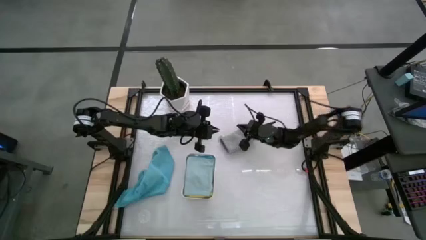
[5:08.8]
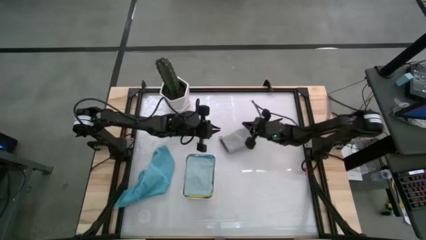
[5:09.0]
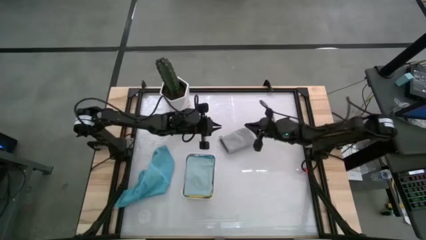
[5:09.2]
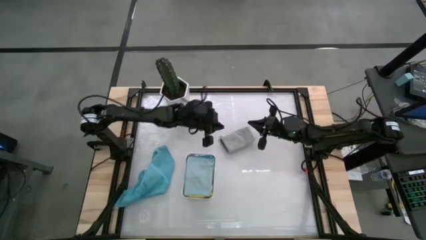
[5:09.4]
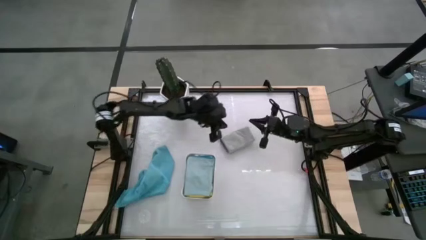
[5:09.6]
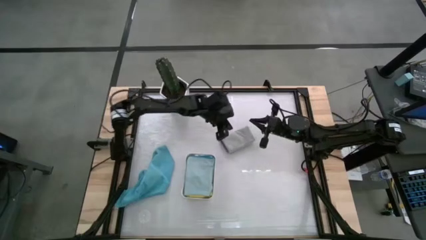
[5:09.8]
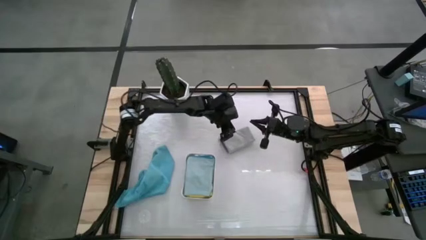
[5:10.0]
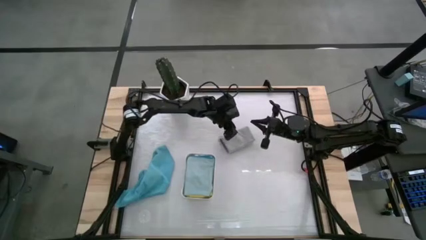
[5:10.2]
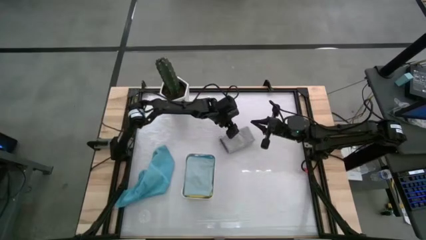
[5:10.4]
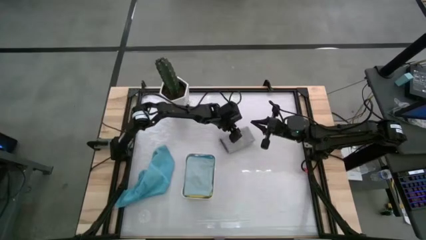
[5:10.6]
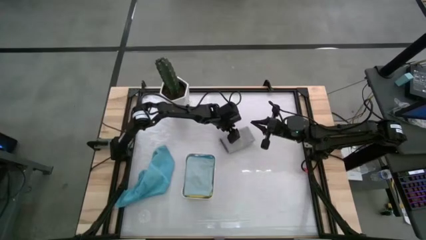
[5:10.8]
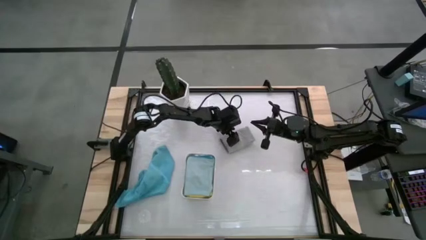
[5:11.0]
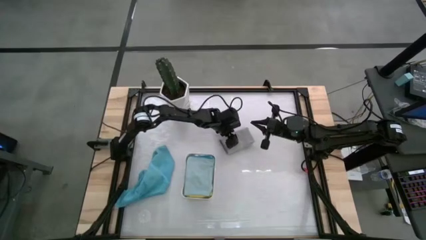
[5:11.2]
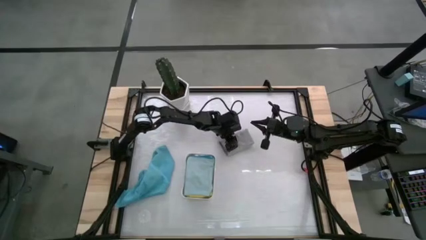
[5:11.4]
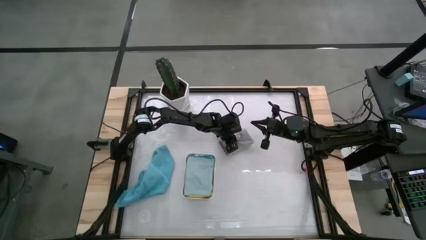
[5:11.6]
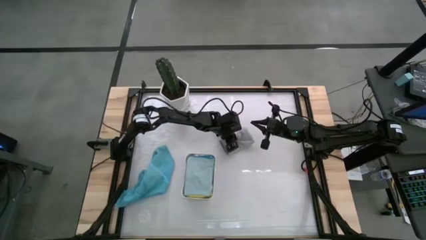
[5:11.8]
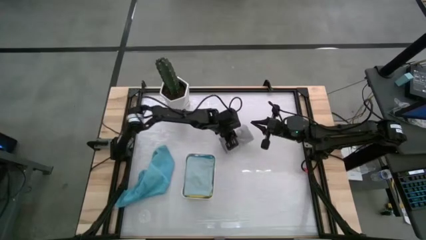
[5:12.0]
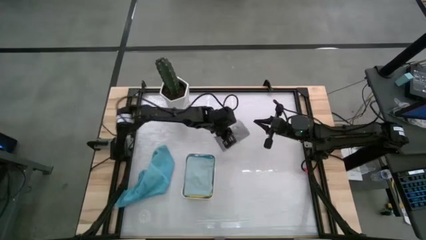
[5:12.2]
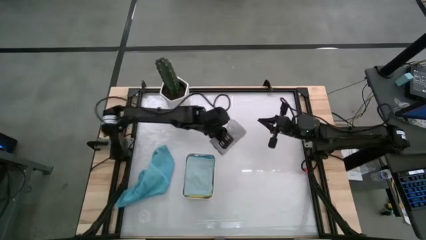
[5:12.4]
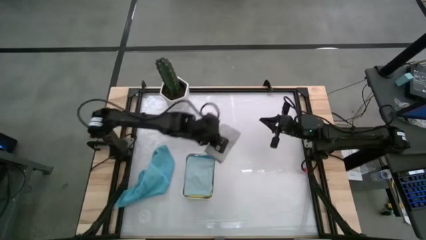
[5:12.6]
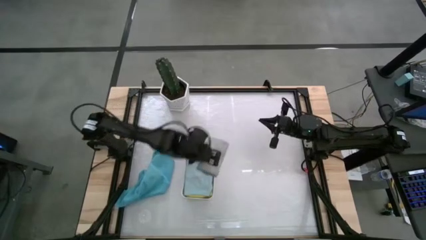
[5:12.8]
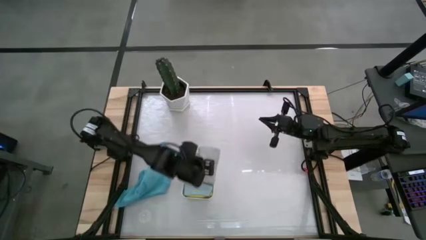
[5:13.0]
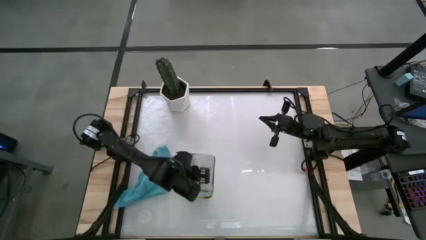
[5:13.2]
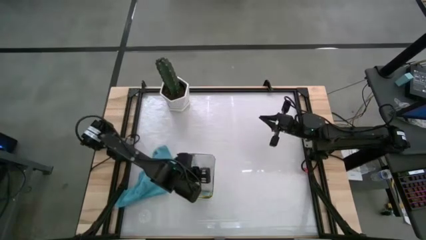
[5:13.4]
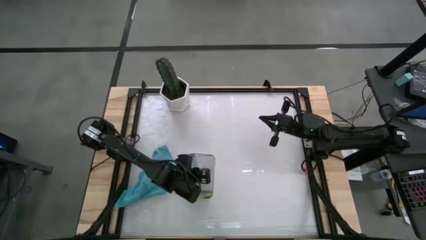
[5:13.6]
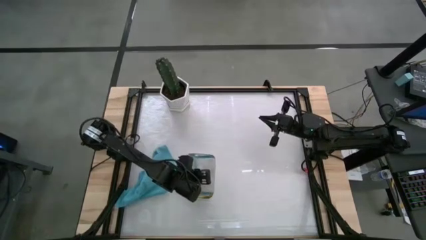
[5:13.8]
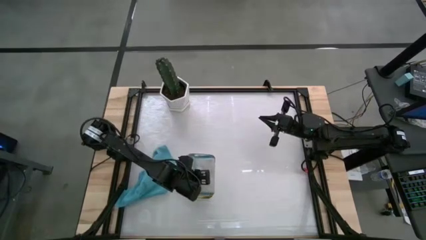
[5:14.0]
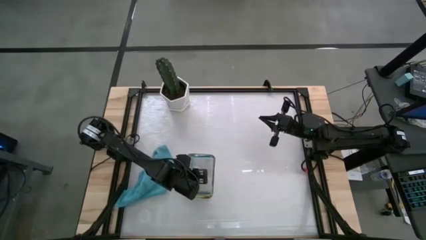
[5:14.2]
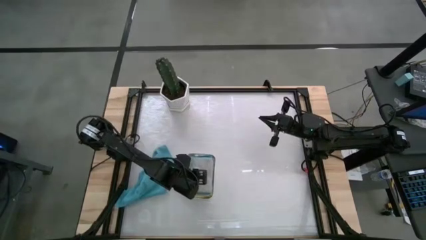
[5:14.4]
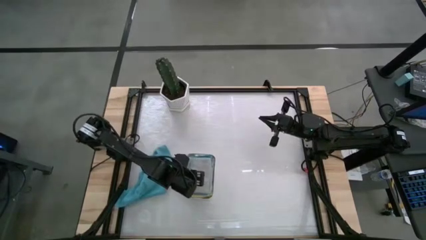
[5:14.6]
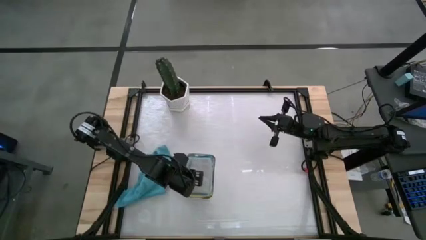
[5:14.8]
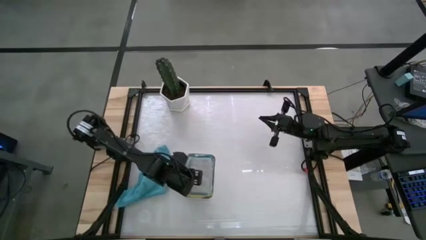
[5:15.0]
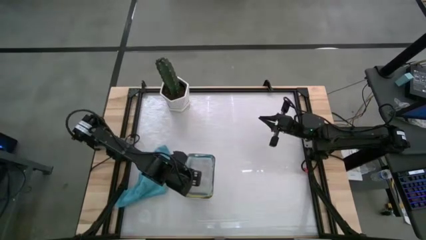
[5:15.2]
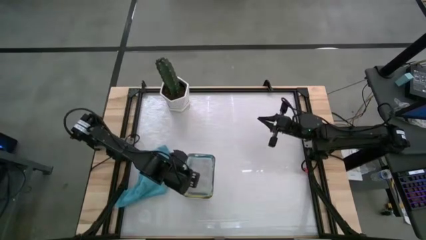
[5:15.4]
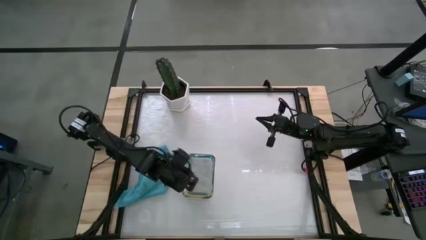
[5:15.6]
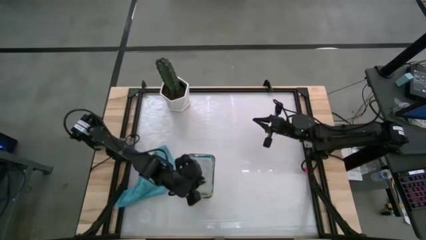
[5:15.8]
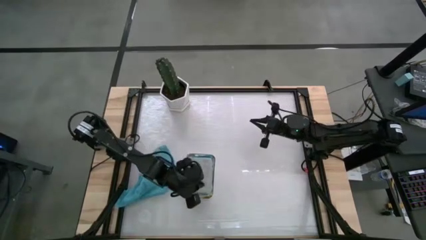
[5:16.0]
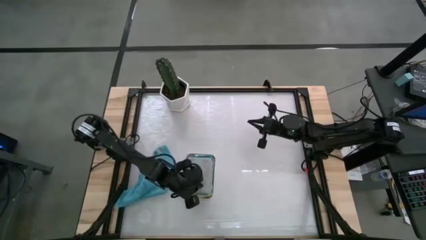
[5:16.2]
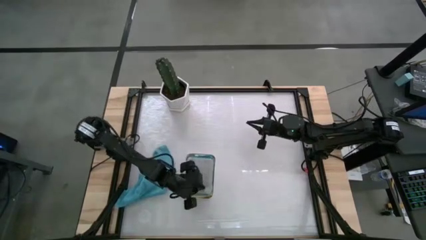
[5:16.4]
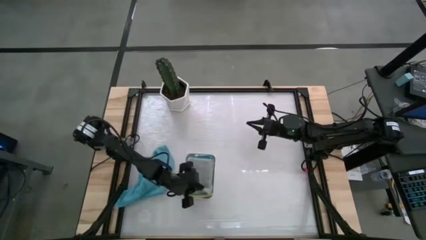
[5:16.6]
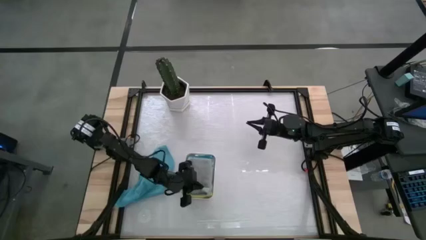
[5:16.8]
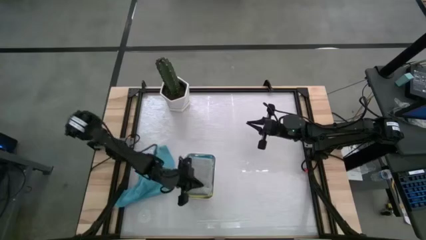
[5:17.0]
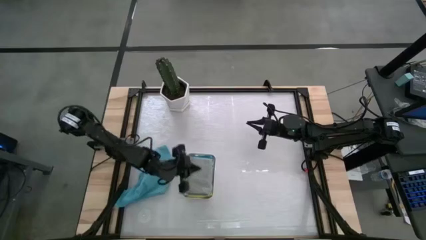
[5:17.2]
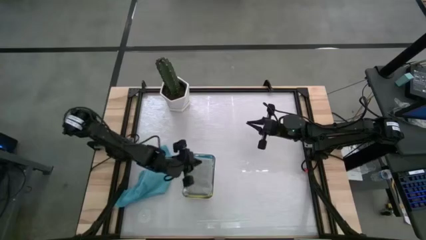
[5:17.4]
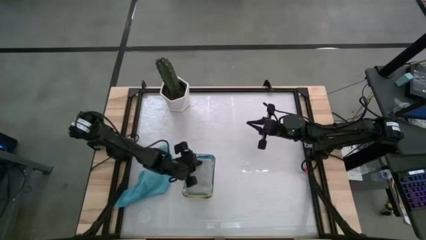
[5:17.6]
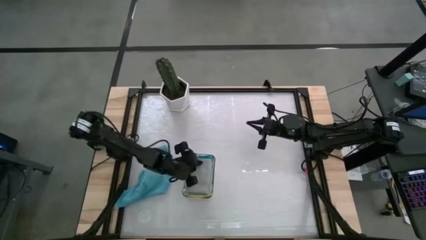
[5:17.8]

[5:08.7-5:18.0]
Task: Fold microfiber towels
Put the gray microfiber towel into the bin

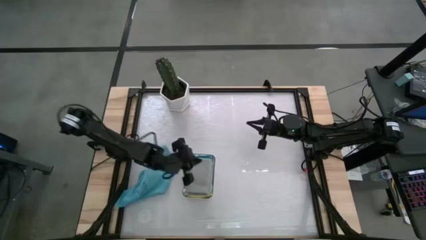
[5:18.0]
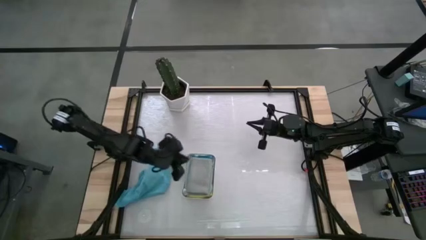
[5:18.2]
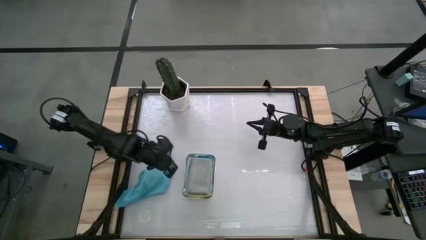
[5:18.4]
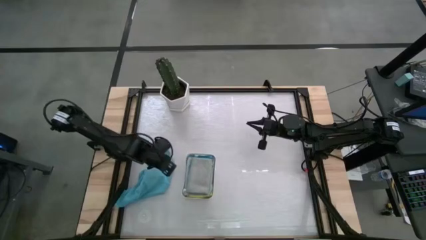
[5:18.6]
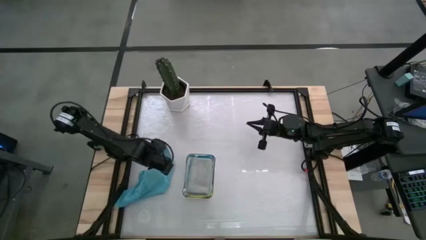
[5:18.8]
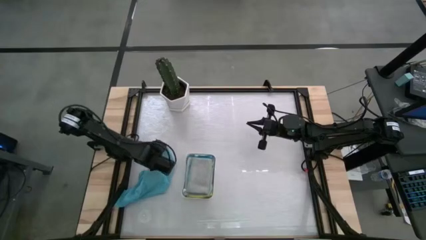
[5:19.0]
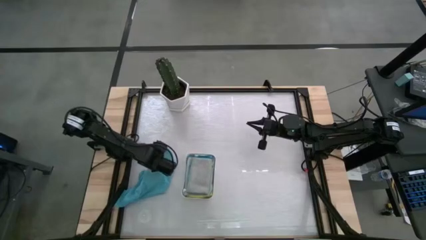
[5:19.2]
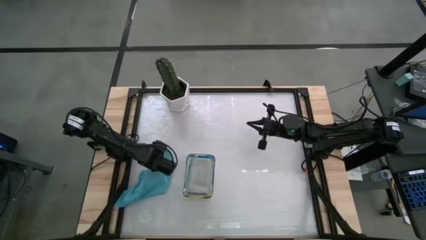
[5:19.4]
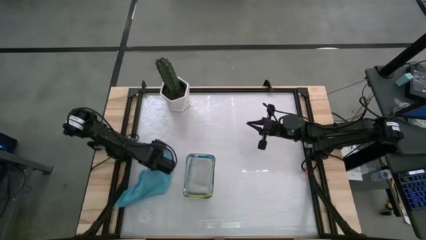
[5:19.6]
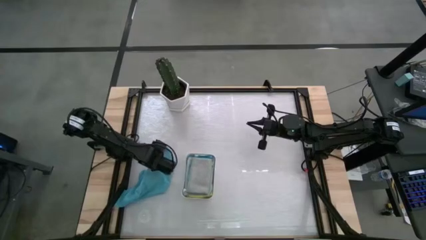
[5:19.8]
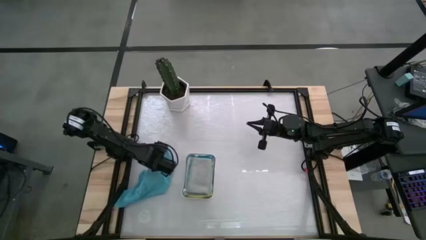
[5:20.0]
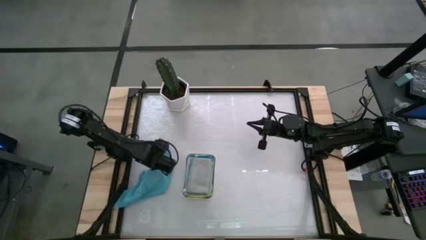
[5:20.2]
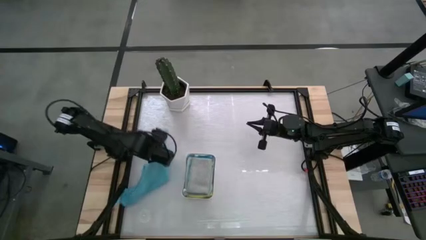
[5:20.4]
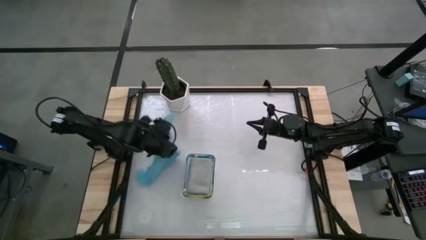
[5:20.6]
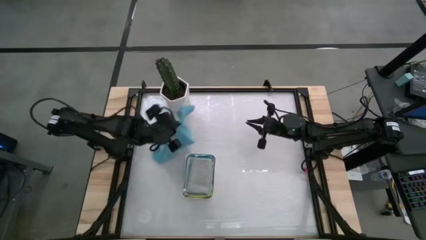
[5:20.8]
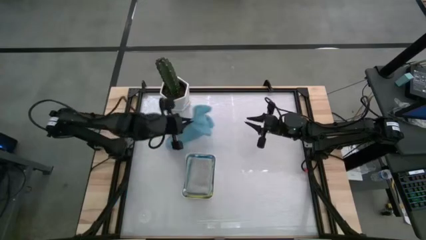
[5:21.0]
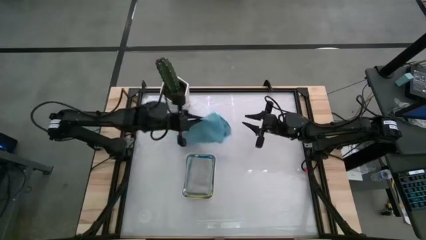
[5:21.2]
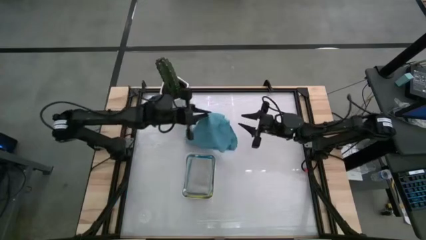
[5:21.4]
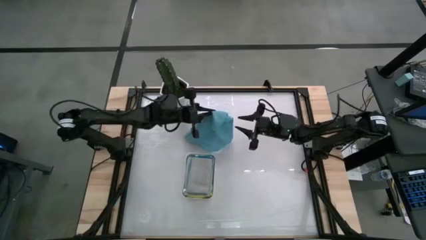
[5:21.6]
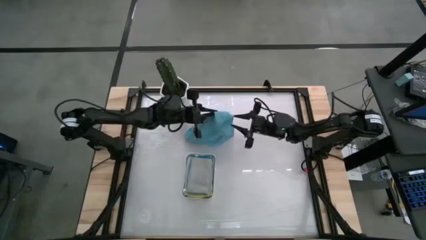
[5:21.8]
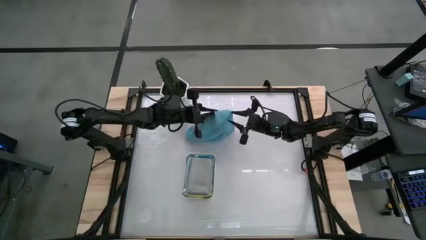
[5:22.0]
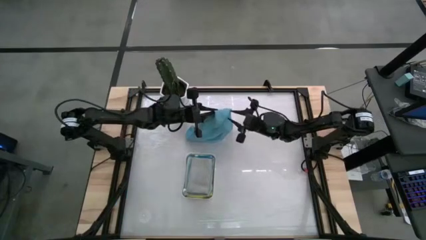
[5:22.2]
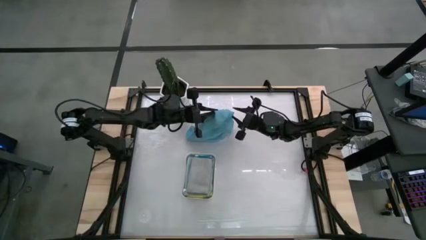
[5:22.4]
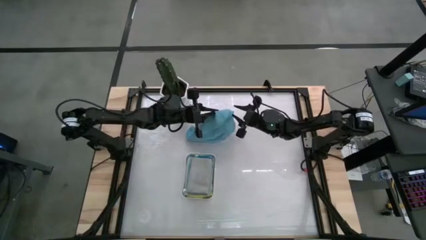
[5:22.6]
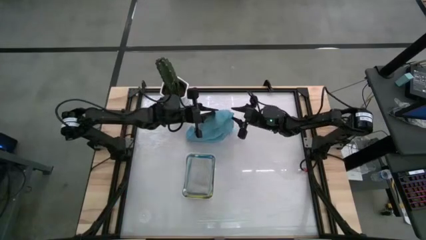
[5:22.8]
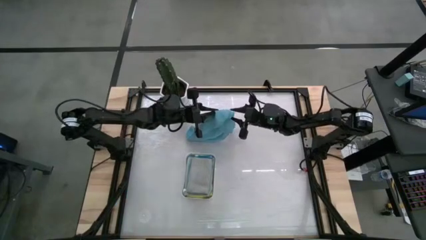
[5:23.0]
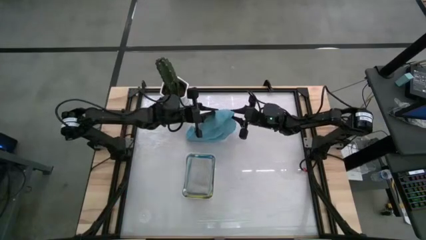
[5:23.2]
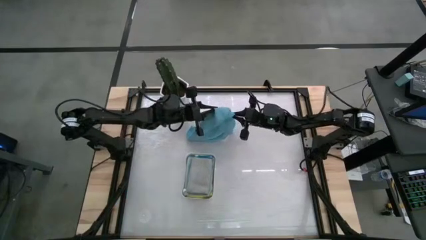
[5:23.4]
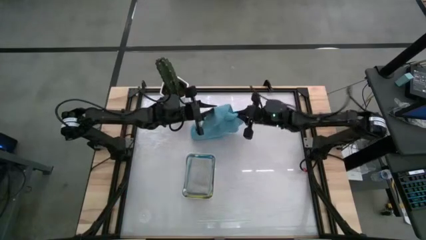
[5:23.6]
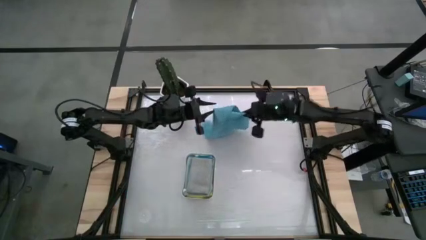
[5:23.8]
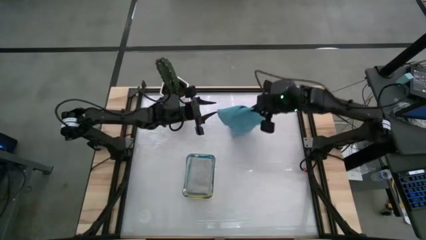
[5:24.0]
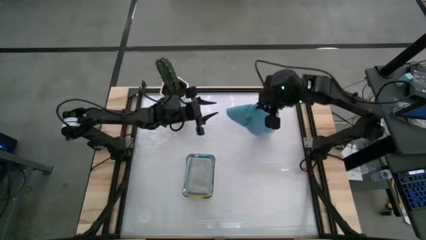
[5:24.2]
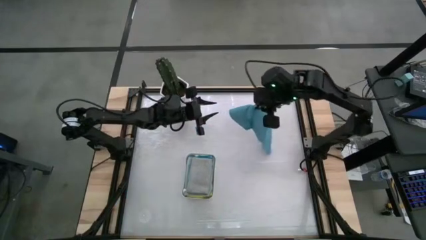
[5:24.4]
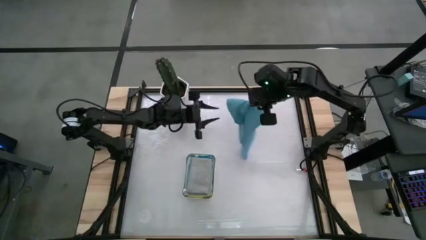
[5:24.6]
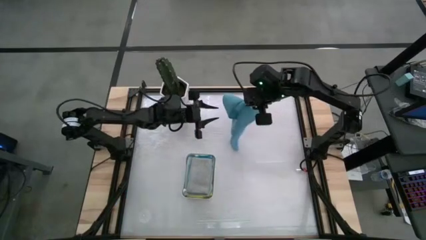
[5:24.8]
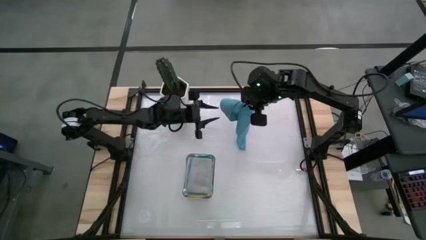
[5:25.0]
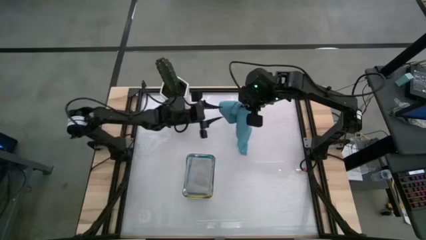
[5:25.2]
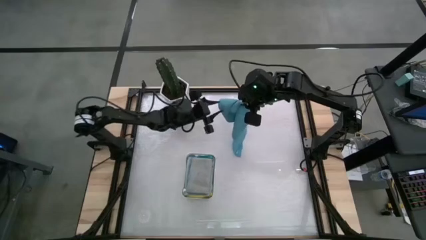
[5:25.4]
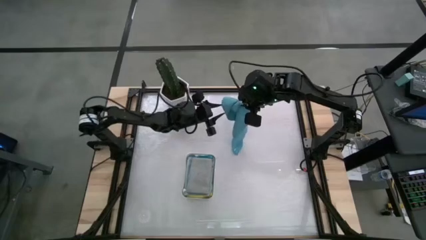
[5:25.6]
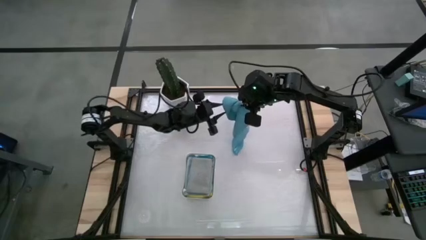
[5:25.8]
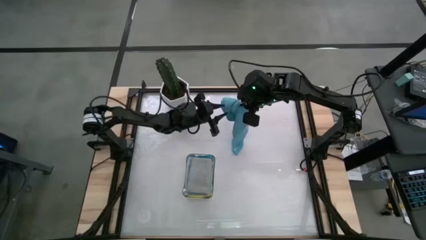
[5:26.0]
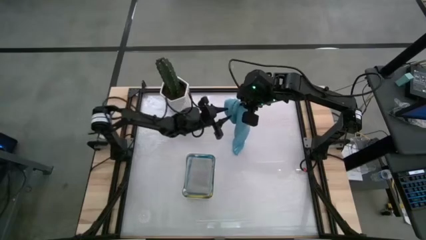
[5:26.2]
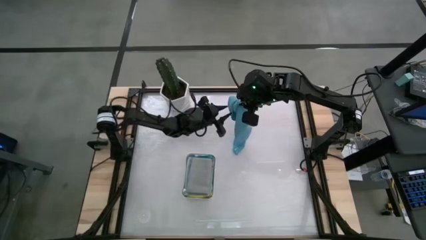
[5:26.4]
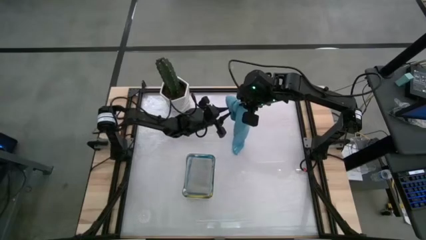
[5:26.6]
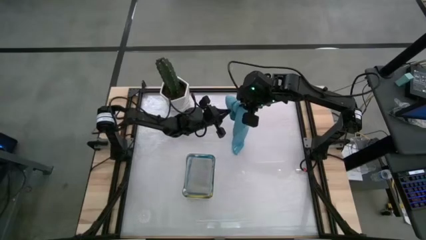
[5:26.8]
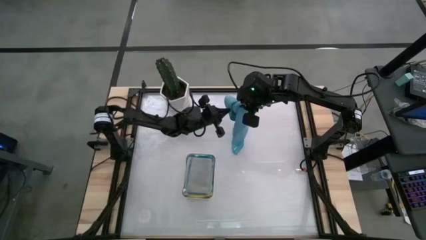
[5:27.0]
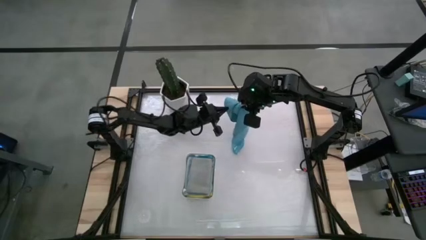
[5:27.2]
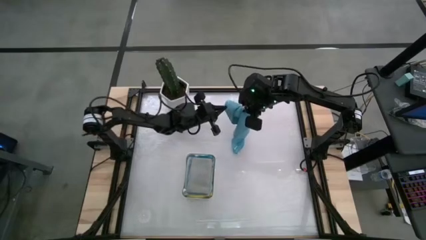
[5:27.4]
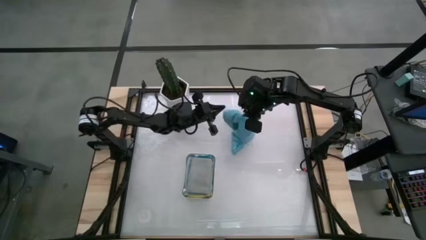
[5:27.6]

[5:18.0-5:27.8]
Fold the blue microfiber towel
